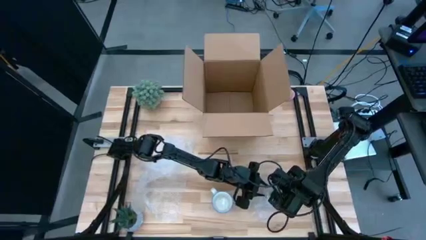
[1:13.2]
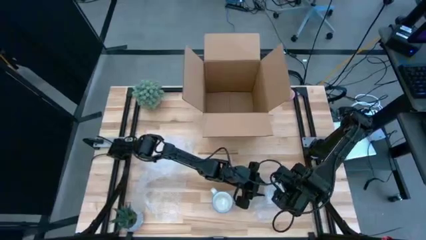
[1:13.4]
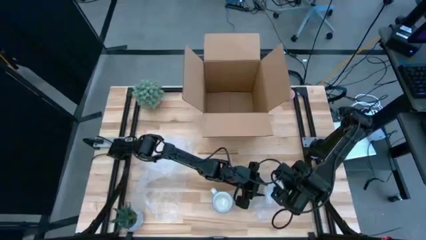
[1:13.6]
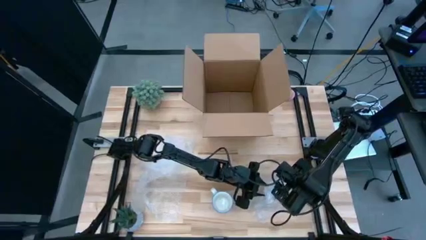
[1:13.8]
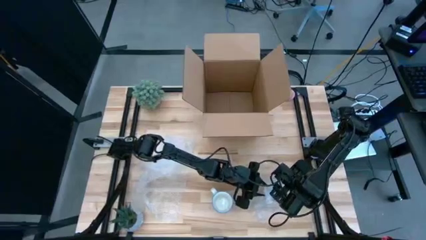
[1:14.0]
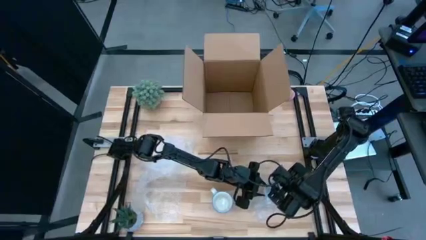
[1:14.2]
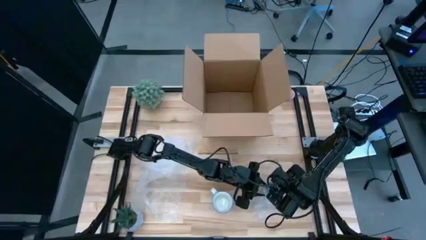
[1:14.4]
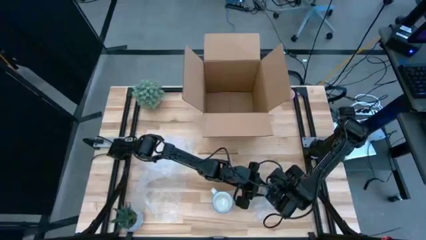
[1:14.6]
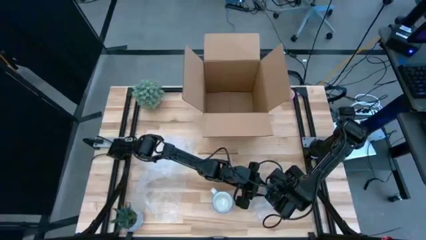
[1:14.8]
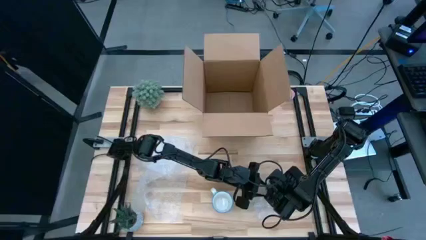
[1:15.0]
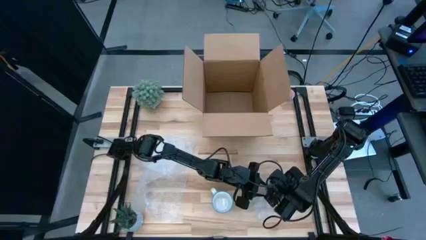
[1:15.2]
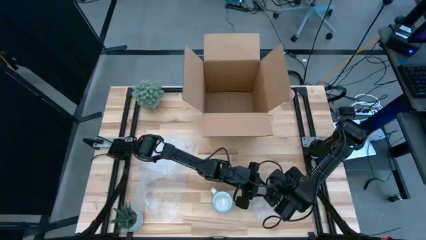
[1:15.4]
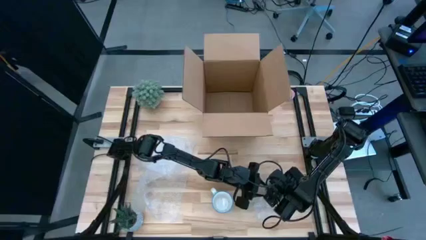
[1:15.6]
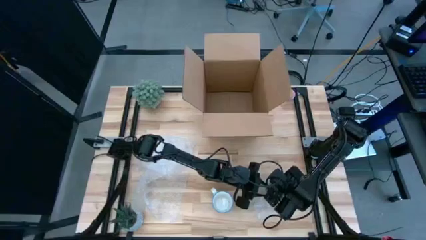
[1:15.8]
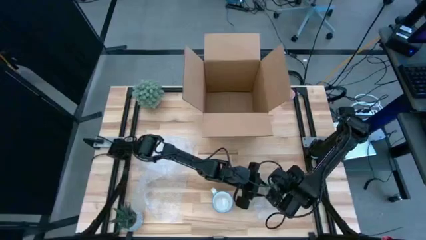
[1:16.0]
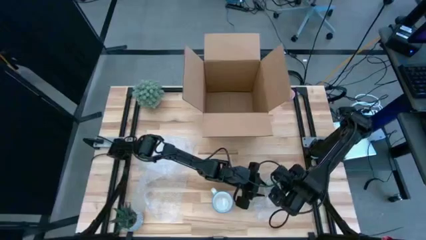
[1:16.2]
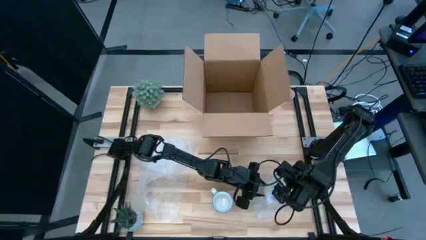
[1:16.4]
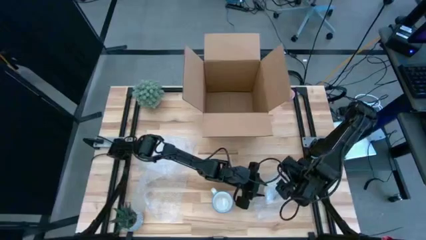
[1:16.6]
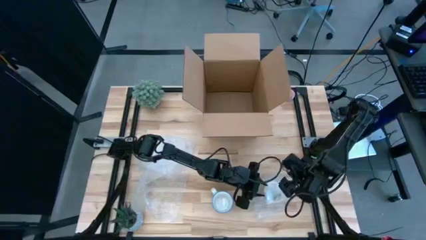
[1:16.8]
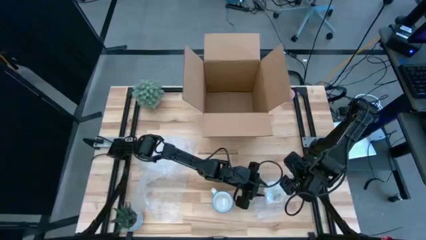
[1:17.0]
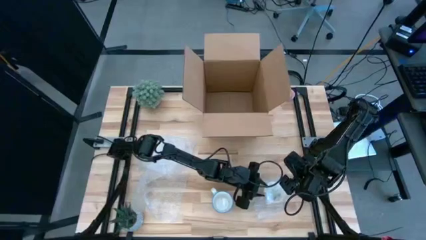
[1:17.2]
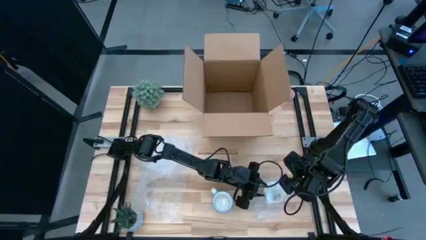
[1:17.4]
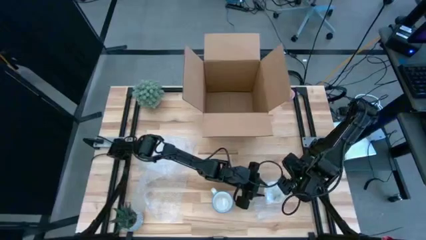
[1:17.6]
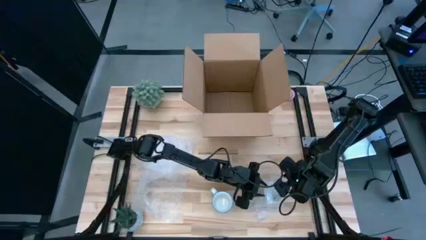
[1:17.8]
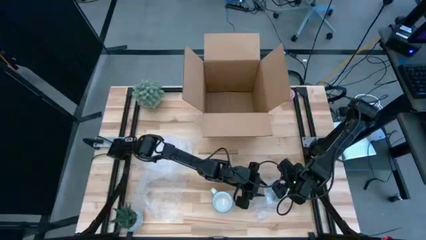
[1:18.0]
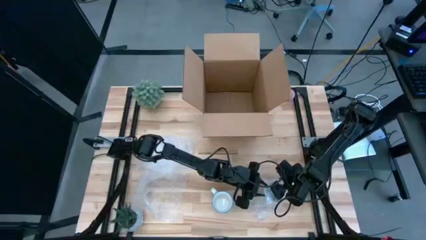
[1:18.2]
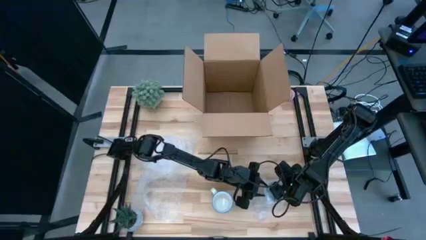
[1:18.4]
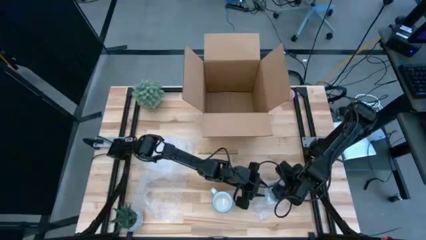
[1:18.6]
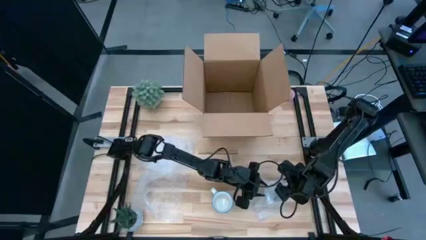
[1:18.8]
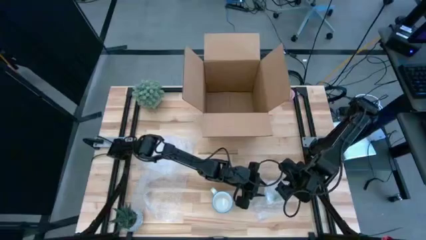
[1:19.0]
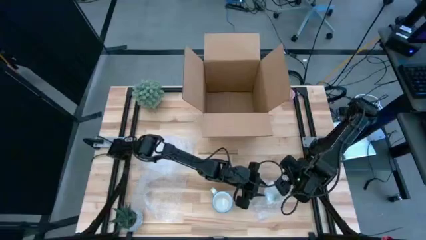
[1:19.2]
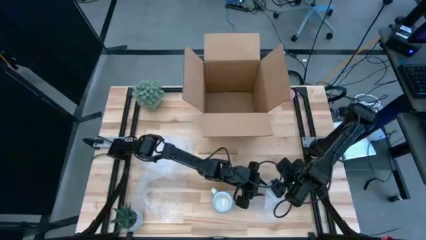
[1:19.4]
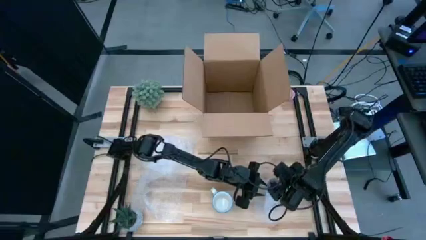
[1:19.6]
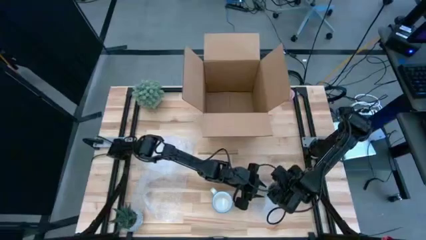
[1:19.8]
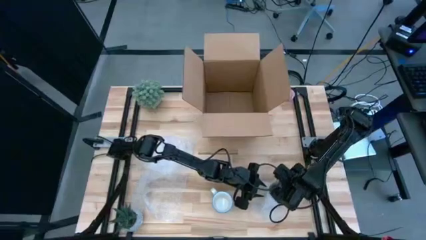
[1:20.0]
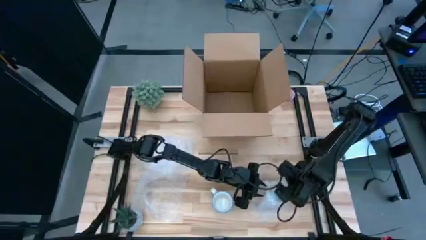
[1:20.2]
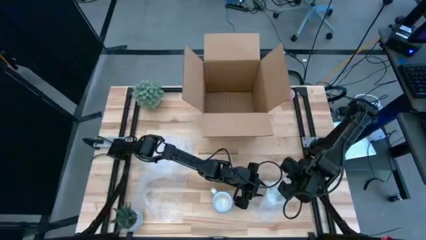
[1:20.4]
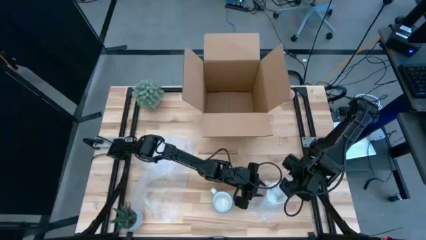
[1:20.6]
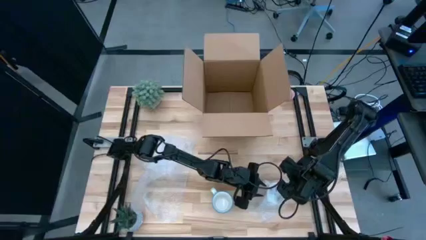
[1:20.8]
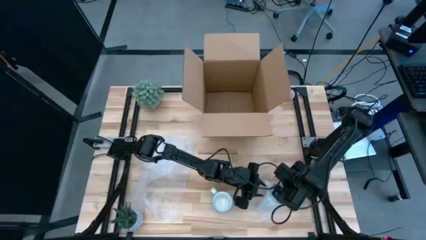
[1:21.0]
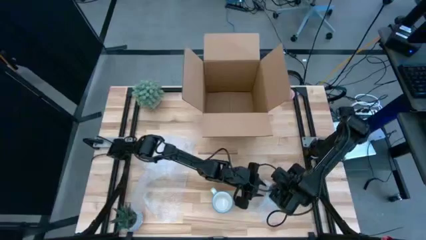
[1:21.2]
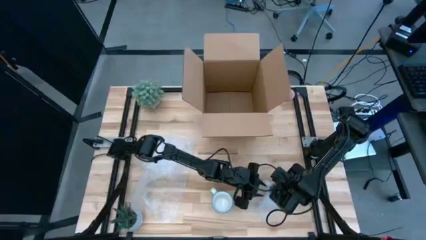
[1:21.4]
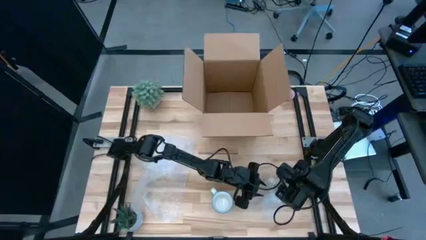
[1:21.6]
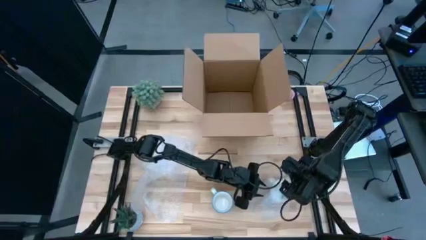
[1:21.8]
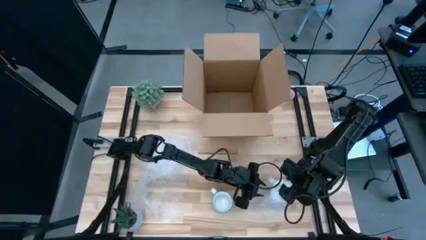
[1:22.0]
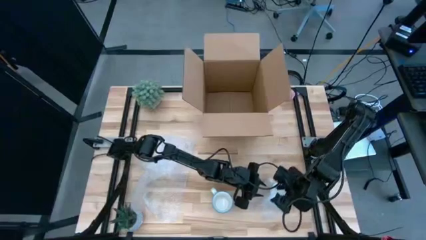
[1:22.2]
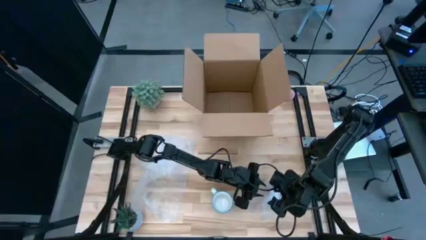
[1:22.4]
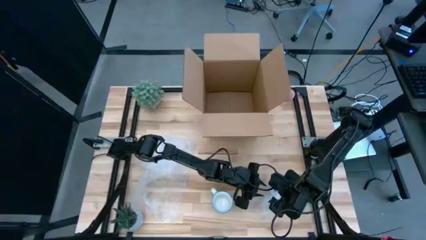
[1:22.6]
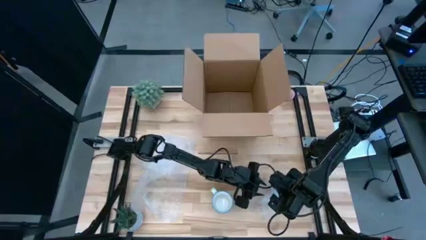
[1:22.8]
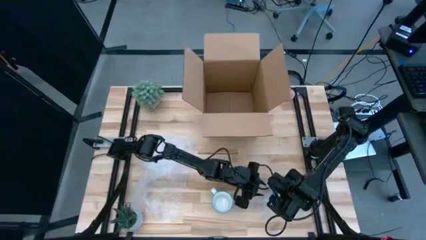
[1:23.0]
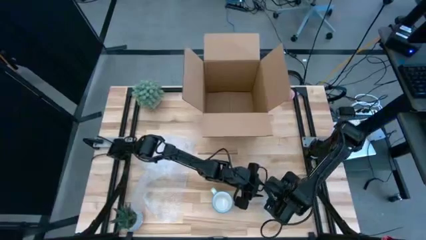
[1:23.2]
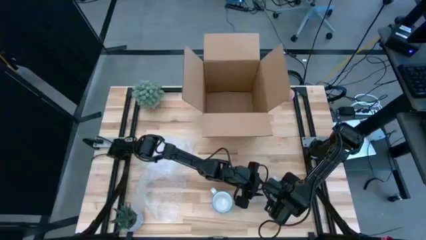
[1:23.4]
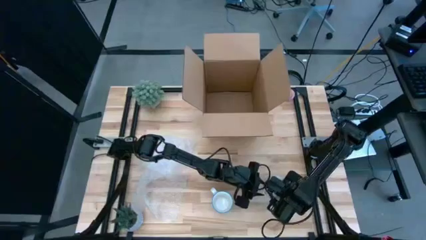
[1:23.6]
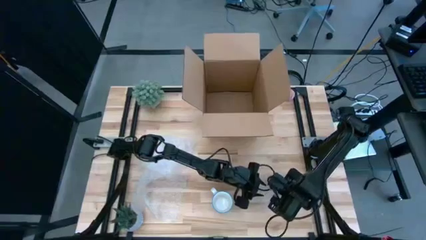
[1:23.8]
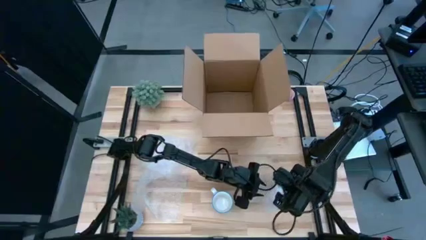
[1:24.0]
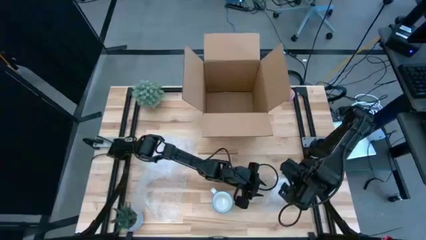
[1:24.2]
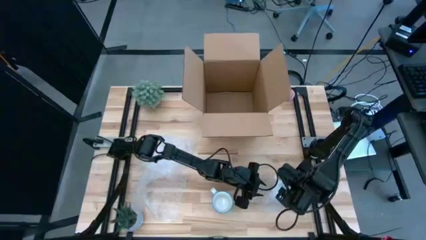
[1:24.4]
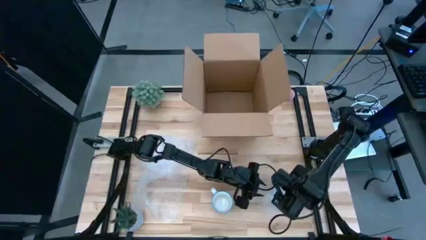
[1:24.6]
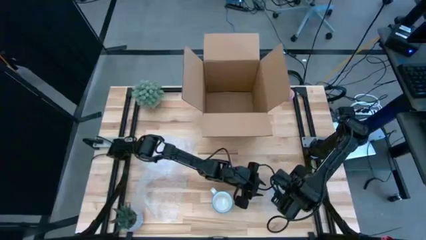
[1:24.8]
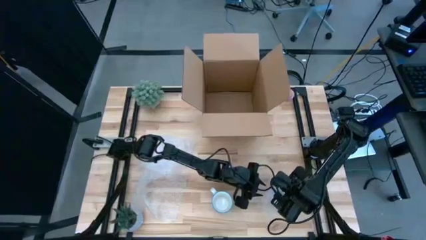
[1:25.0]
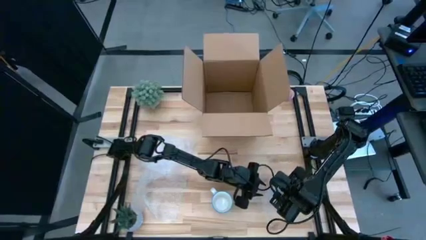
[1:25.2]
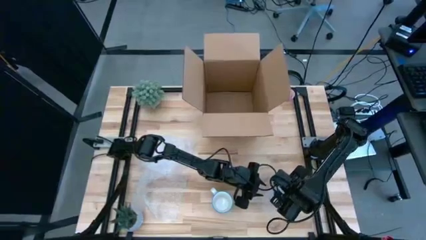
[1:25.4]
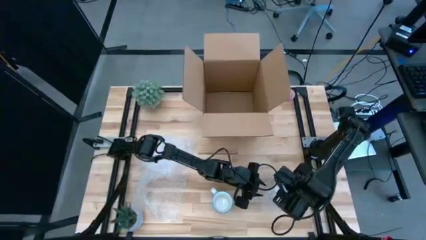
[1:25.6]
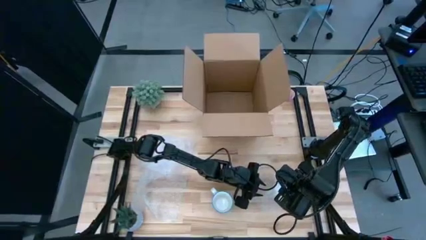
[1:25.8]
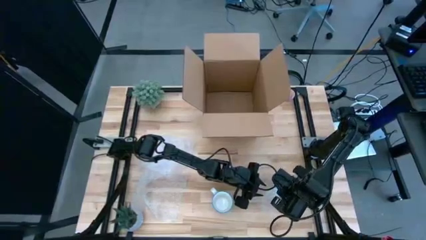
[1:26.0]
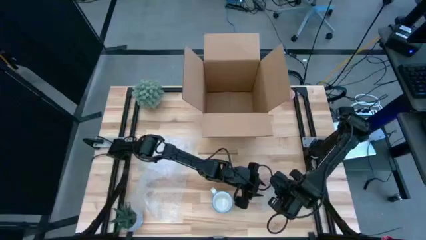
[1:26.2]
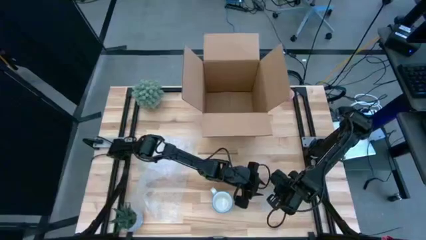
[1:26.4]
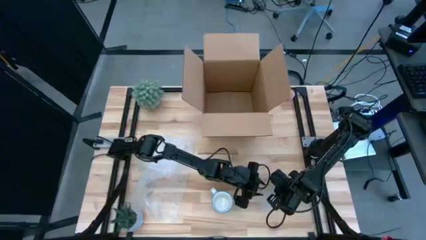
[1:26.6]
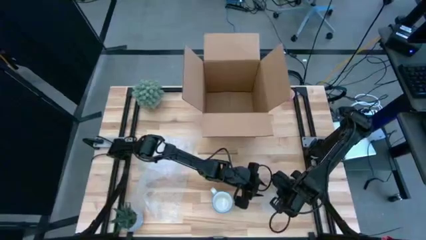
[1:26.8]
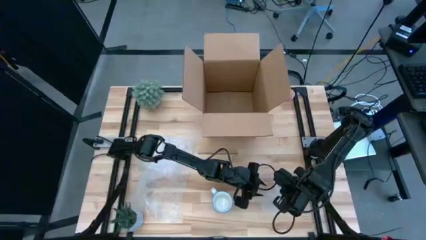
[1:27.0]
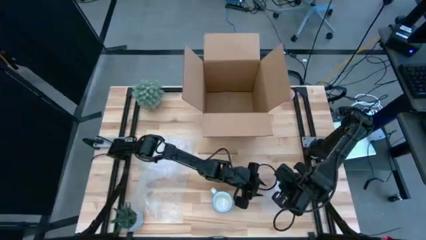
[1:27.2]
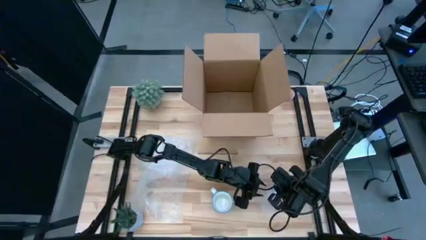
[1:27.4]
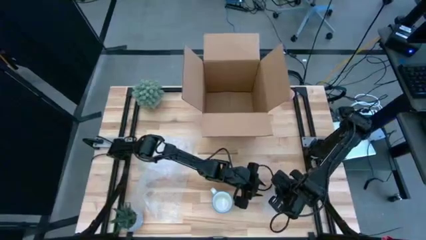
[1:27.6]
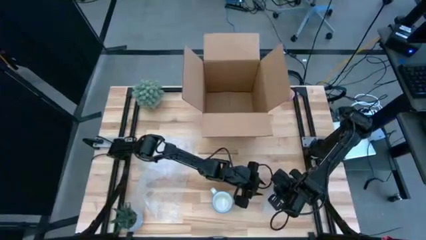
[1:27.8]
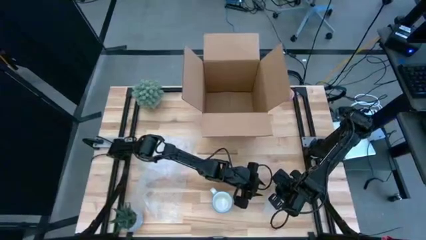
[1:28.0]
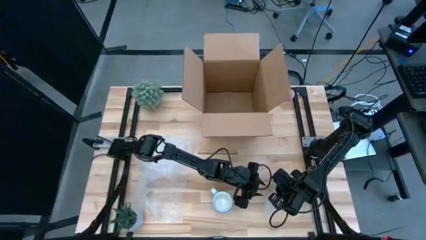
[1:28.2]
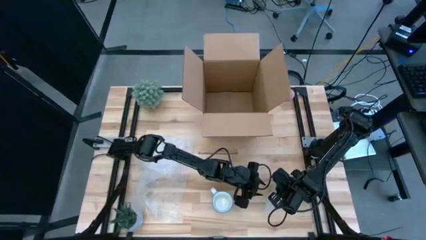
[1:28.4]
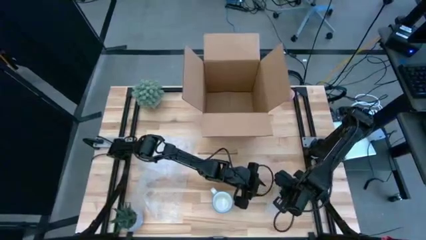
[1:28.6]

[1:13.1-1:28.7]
Task: wrap mug
Wrap the yellow mug with the bubble wrap
